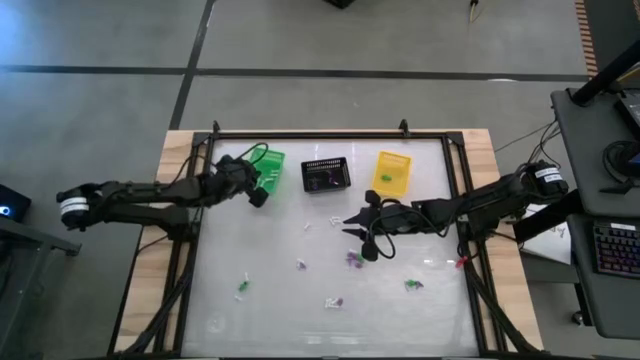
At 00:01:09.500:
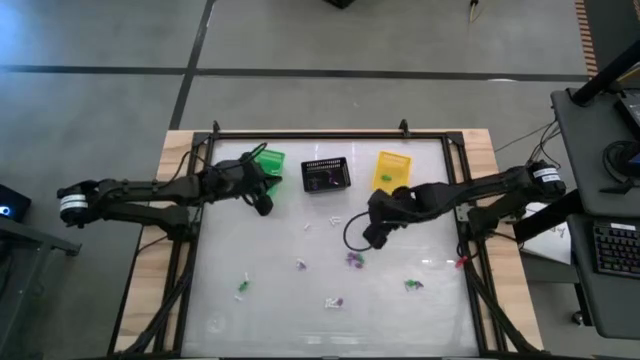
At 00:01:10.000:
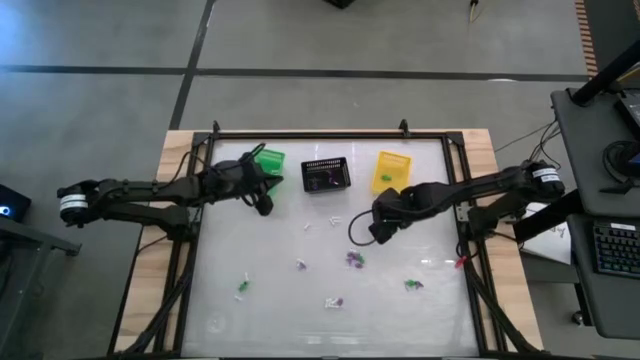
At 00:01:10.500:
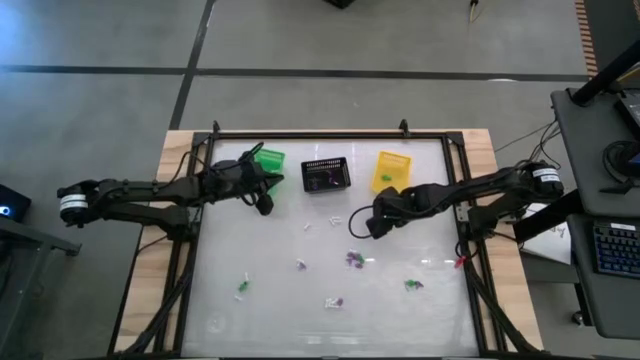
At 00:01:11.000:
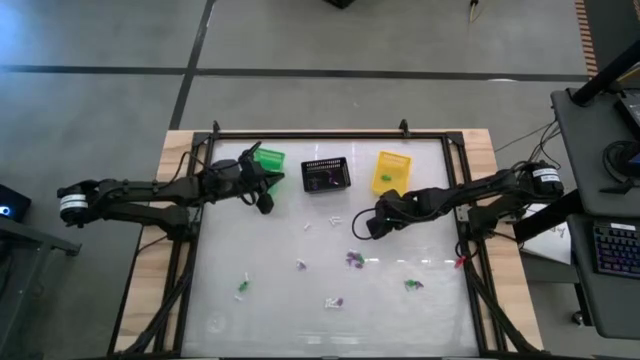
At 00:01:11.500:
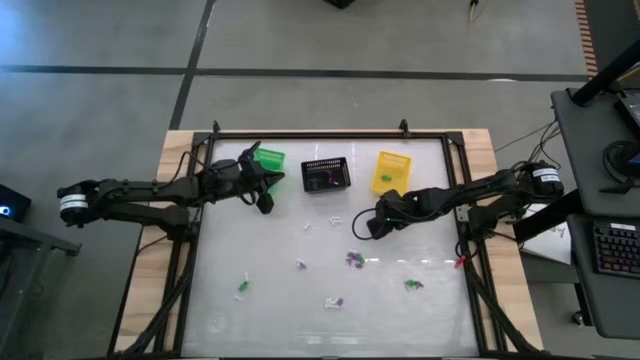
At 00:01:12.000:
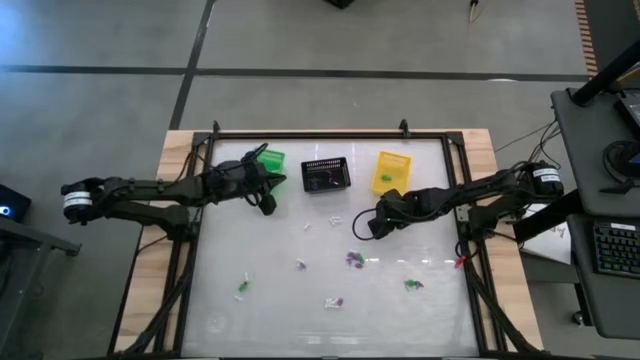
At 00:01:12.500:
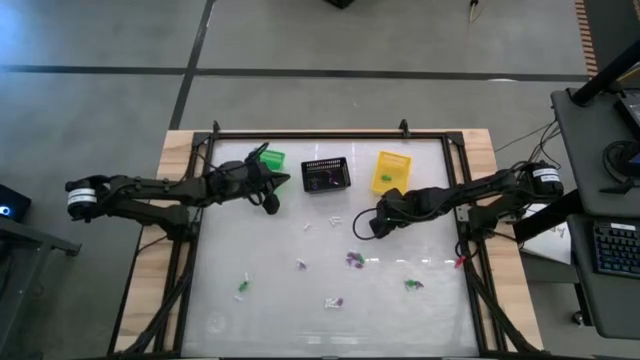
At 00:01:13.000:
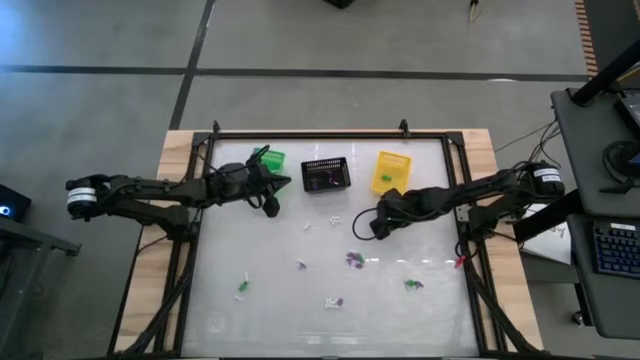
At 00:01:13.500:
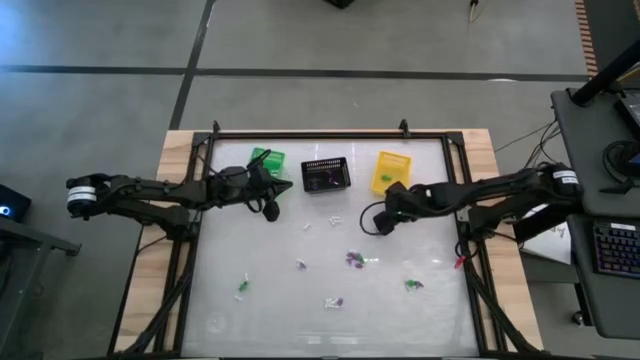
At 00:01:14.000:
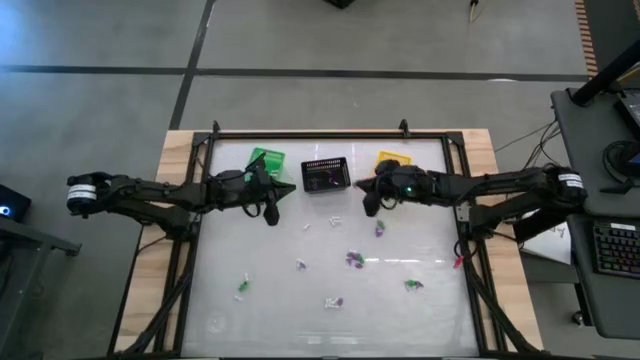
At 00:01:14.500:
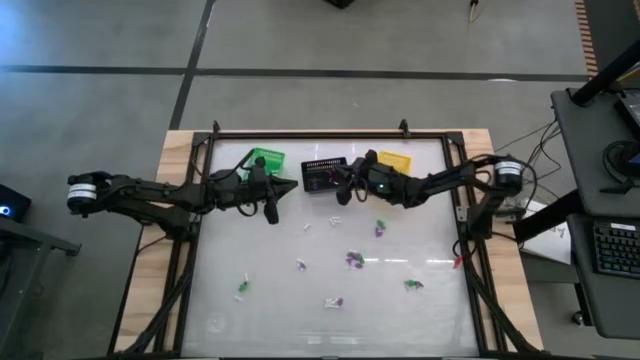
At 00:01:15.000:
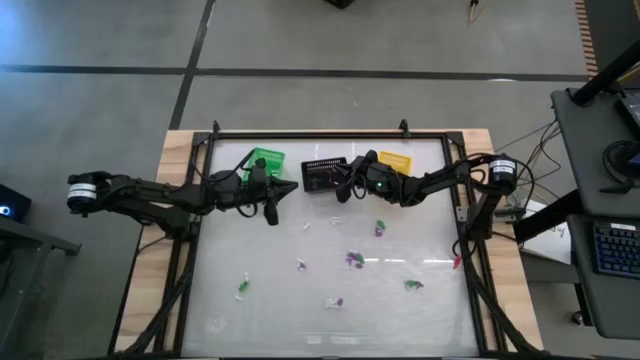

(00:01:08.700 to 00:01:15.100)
Task: Sort Halloween decoration
Put the purple witch hat toy into the black basket

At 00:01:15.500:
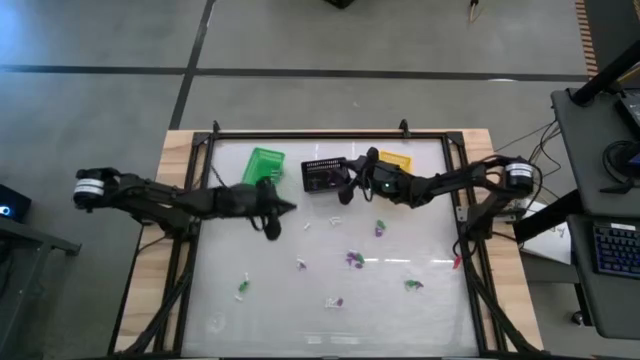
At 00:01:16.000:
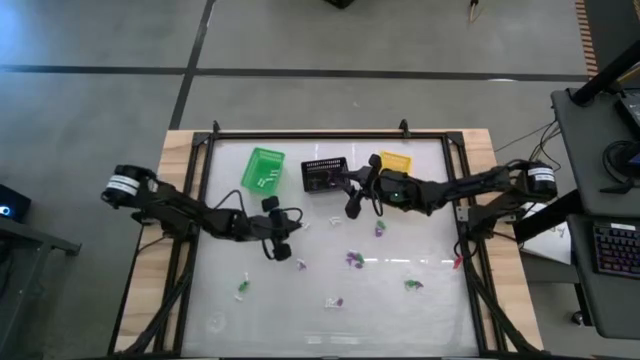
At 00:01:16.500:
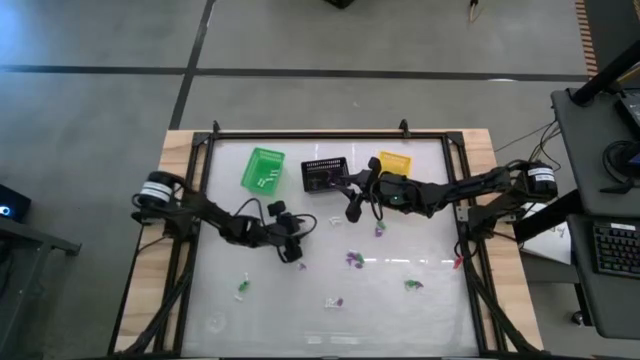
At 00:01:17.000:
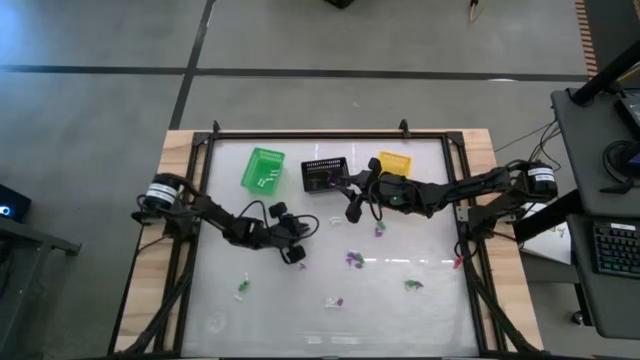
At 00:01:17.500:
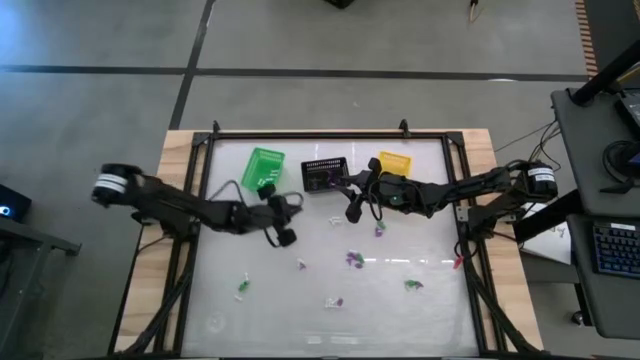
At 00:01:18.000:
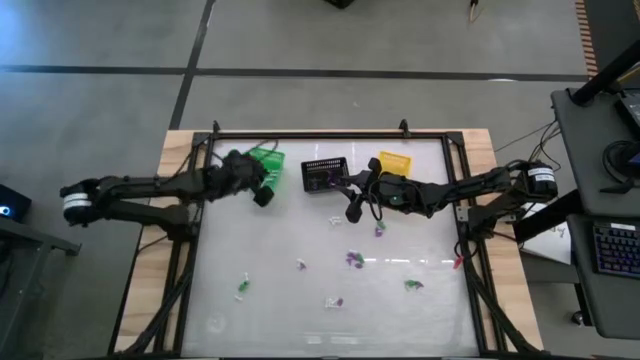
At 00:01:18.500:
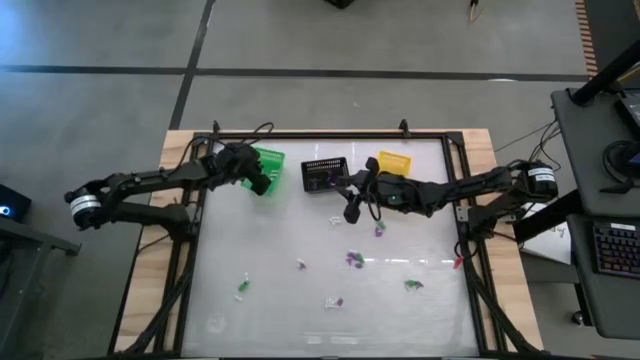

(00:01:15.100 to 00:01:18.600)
Put the white bone toy into the green basket

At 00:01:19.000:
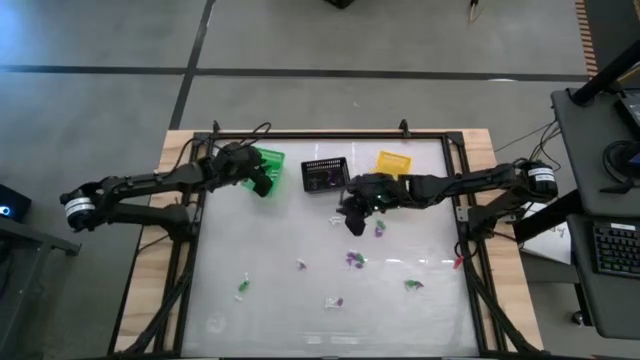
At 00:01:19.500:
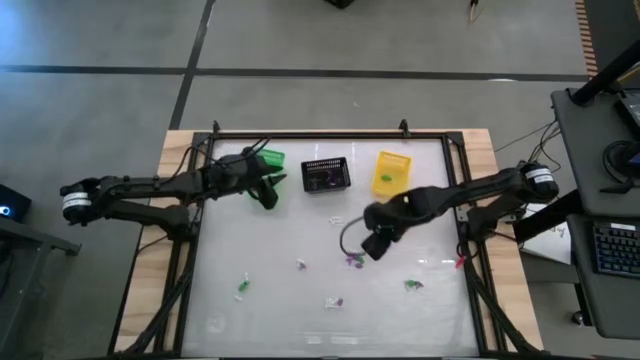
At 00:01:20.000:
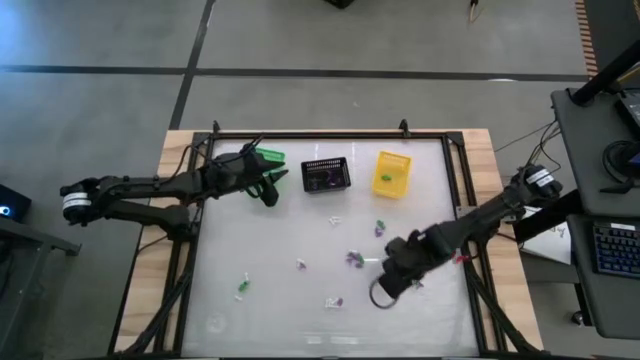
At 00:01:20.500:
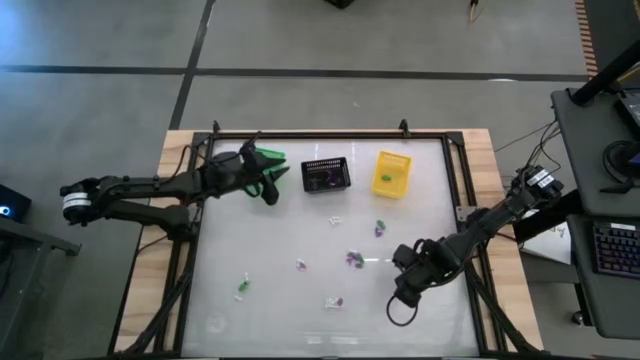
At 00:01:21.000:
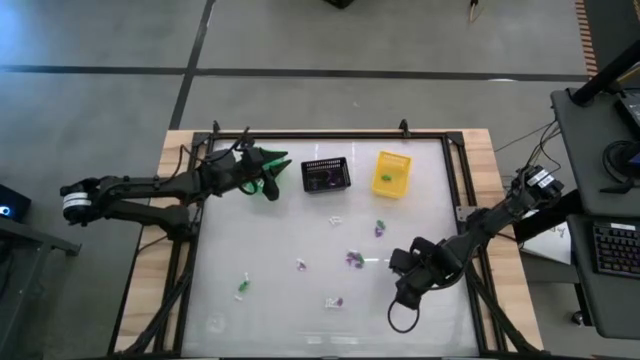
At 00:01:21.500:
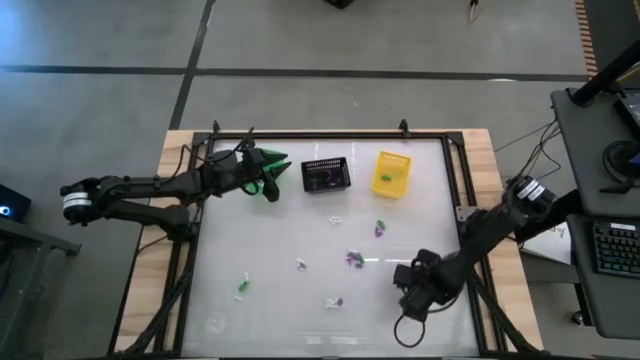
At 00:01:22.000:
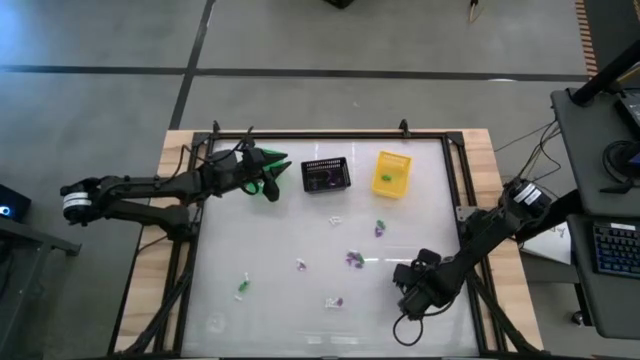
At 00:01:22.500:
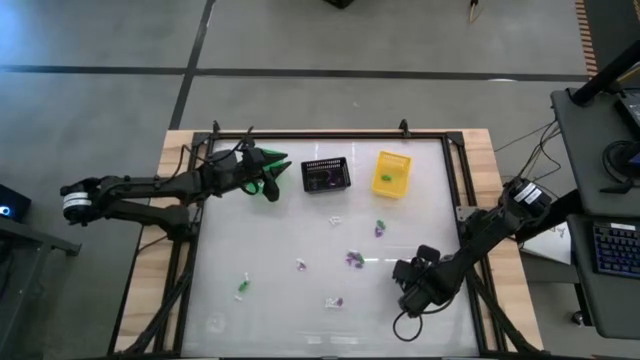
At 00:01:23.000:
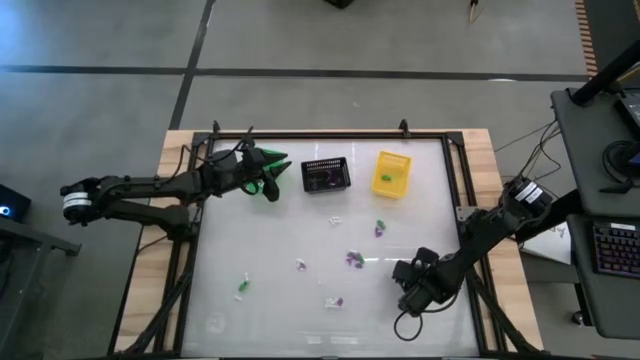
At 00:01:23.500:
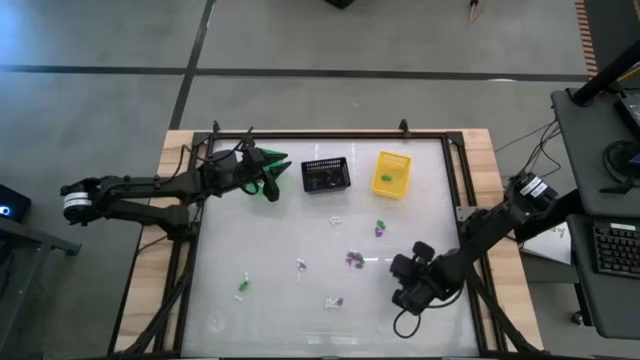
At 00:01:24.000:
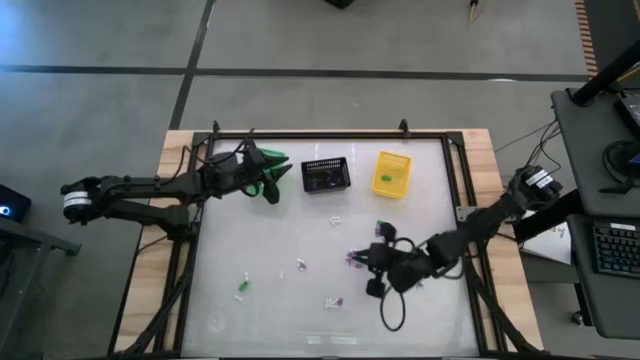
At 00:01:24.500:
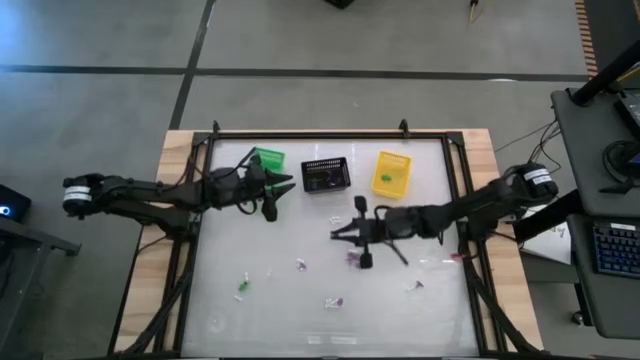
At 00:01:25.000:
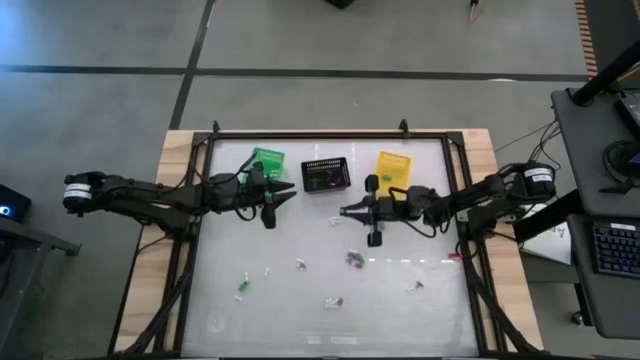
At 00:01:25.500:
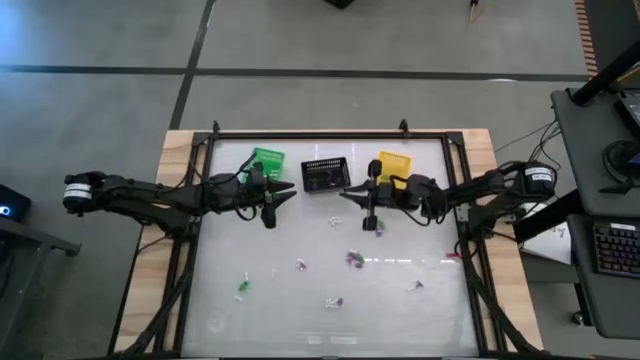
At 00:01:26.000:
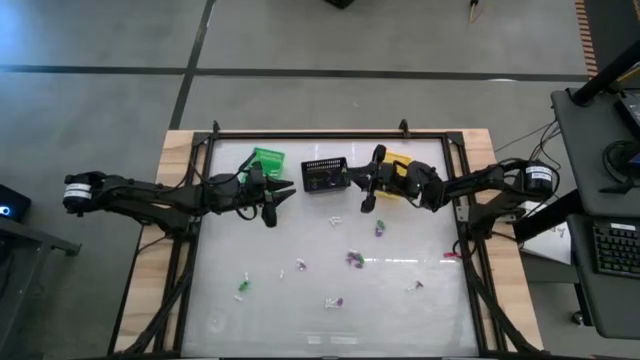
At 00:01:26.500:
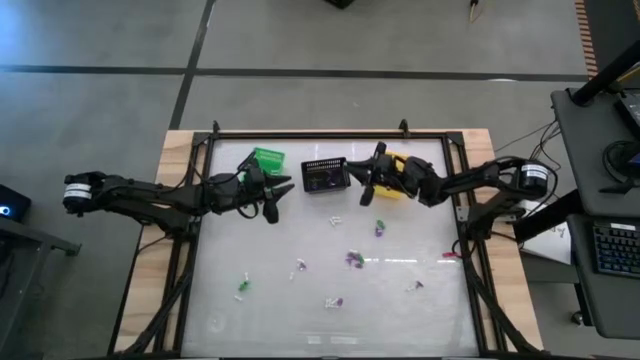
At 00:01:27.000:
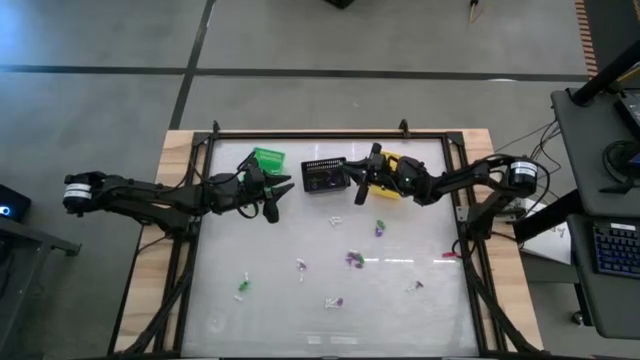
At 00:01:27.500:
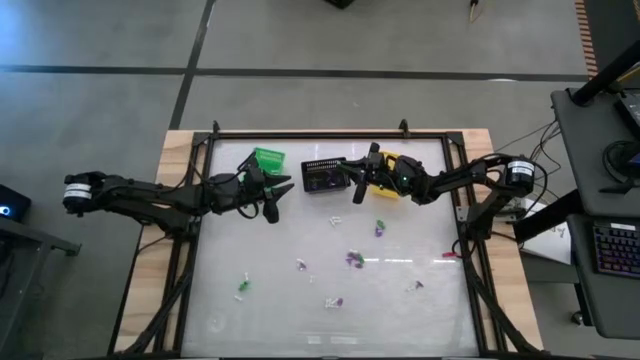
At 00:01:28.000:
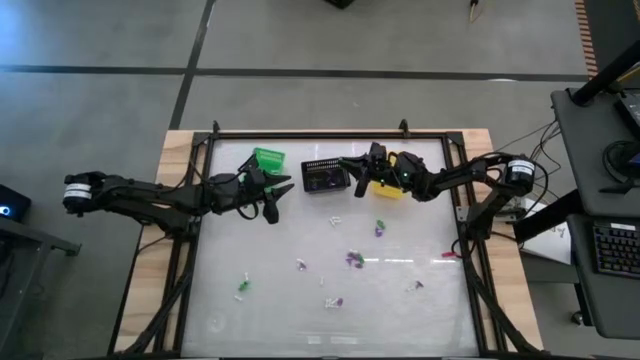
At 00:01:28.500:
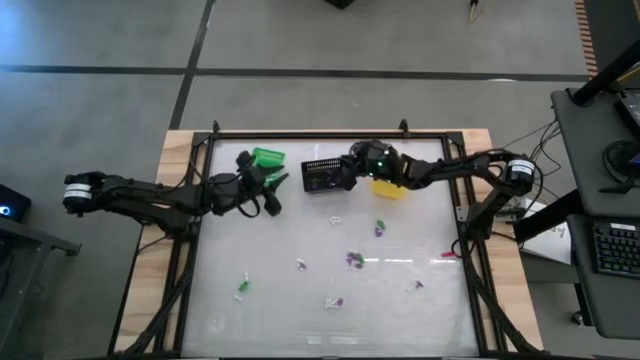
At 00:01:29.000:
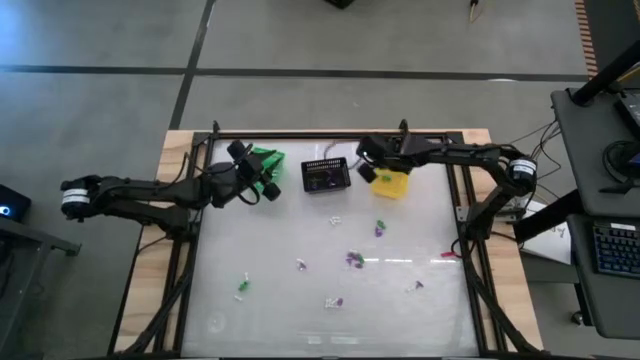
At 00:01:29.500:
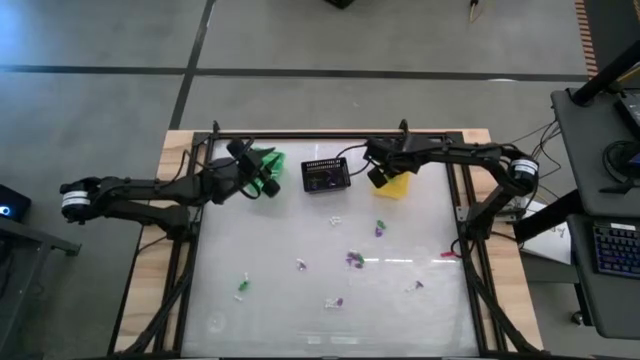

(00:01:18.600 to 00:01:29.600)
Put the green skeleton toy into the yellow basket

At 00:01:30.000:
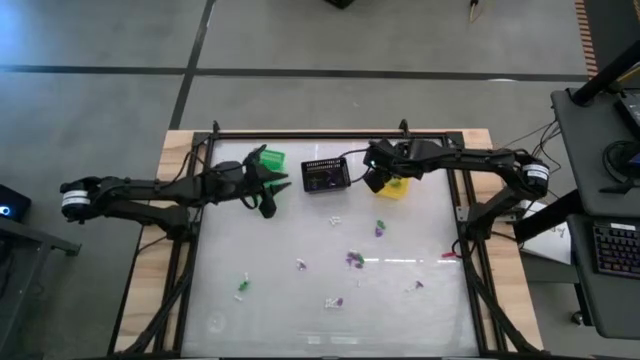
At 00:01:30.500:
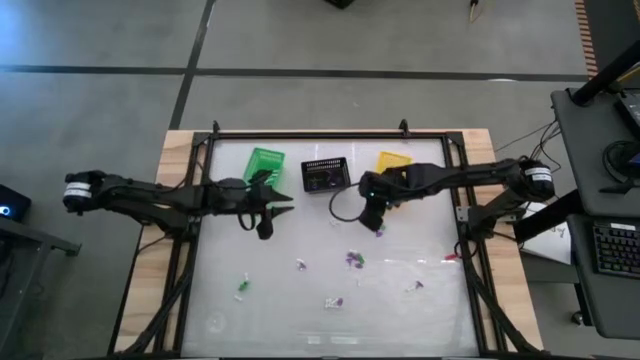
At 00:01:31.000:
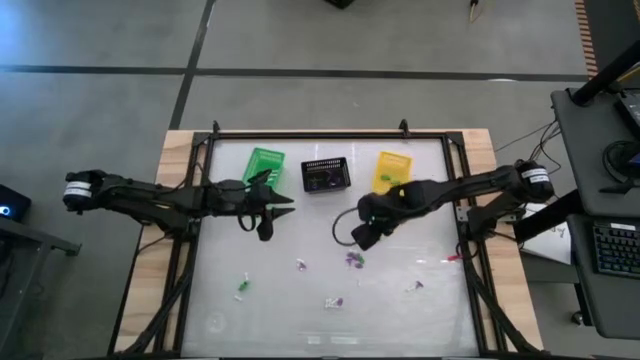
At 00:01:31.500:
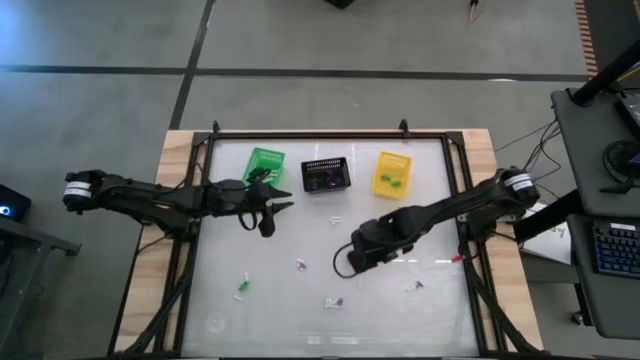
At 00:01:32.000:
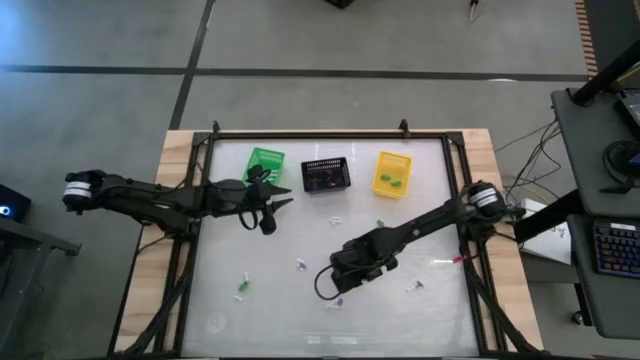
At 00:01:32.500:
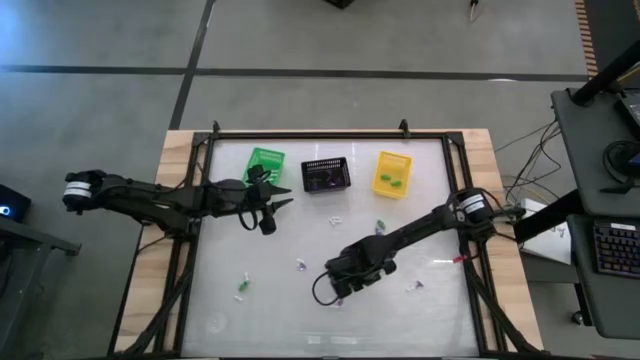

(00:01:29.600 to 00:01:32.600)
Put the white bone toy into the green basket
